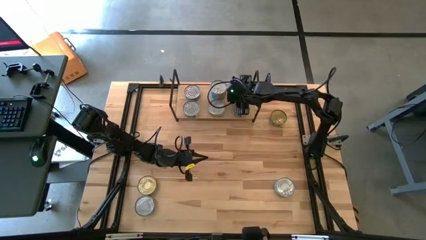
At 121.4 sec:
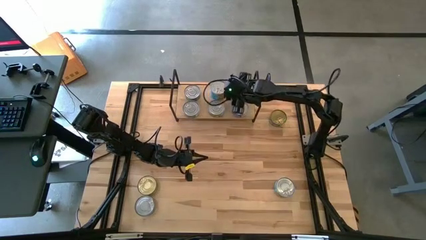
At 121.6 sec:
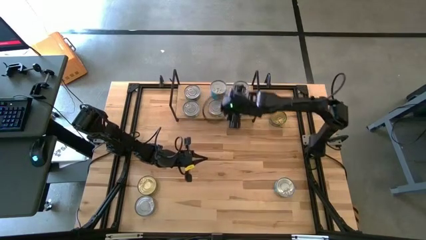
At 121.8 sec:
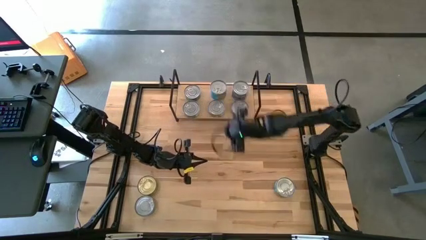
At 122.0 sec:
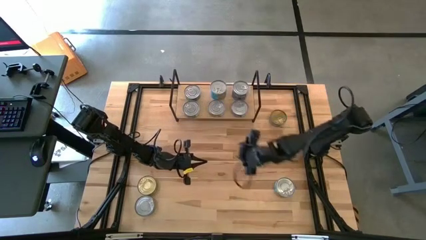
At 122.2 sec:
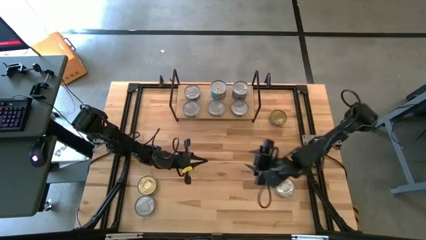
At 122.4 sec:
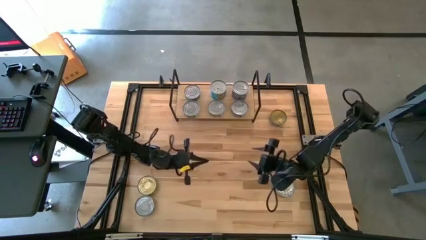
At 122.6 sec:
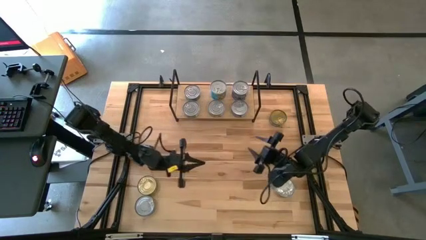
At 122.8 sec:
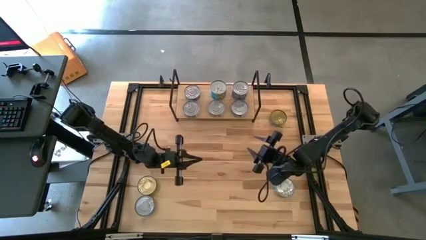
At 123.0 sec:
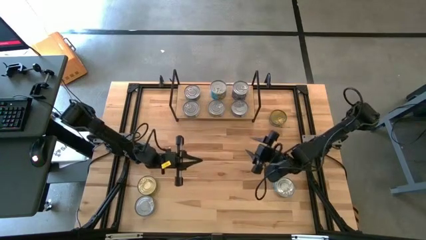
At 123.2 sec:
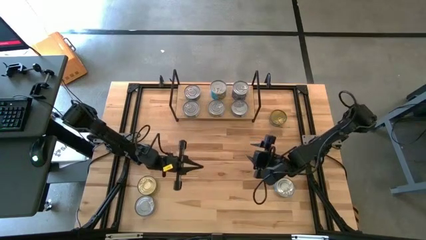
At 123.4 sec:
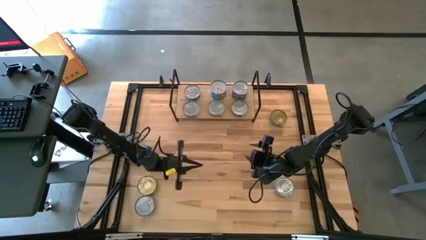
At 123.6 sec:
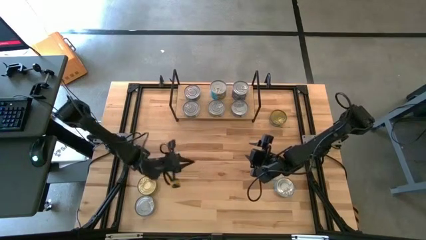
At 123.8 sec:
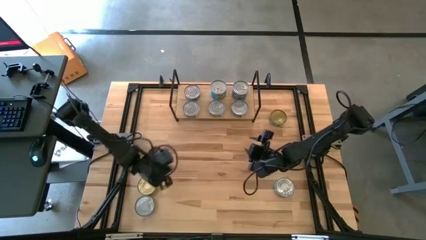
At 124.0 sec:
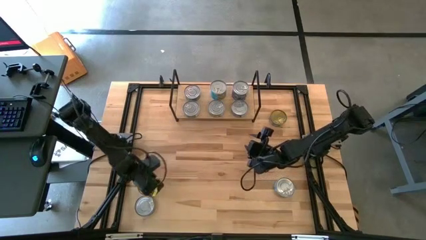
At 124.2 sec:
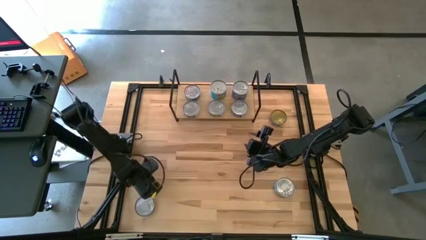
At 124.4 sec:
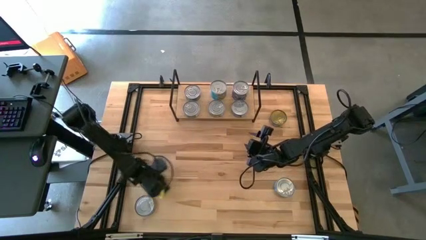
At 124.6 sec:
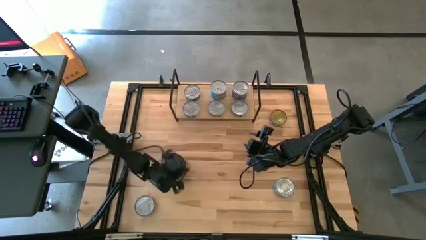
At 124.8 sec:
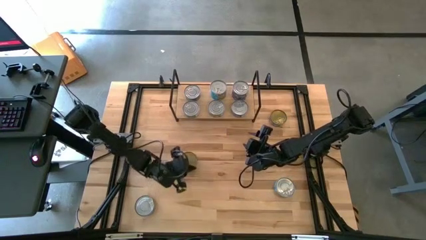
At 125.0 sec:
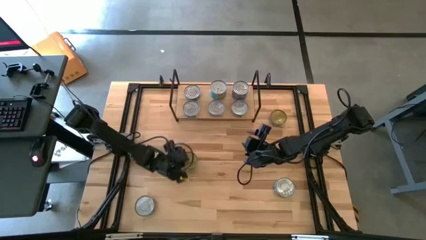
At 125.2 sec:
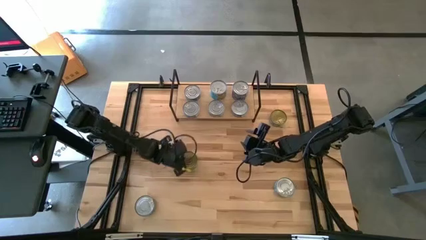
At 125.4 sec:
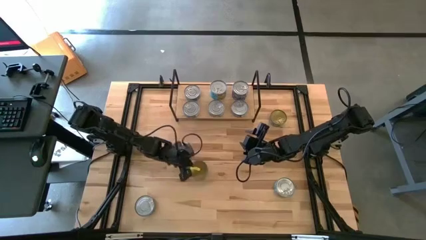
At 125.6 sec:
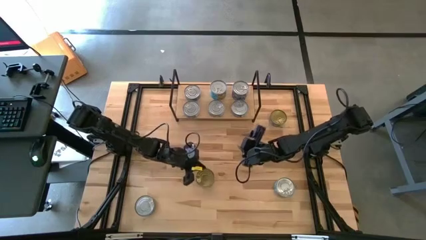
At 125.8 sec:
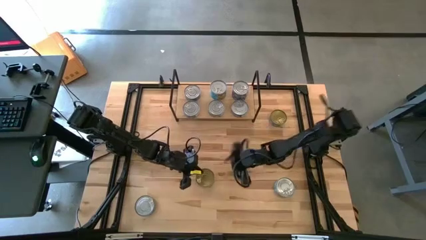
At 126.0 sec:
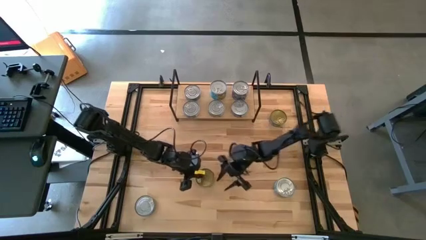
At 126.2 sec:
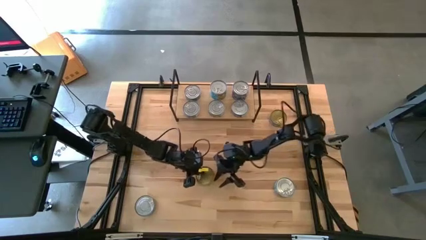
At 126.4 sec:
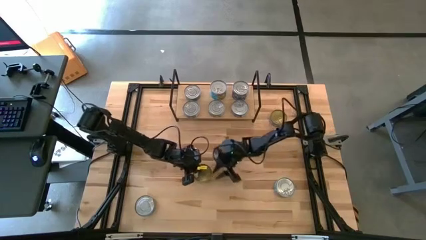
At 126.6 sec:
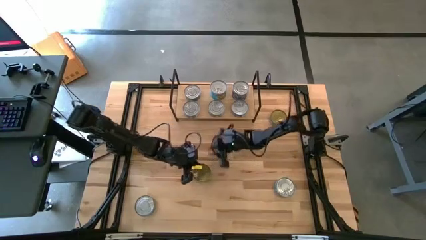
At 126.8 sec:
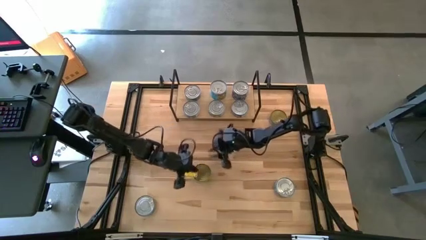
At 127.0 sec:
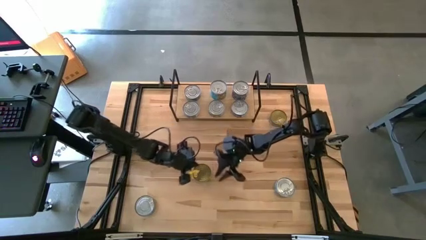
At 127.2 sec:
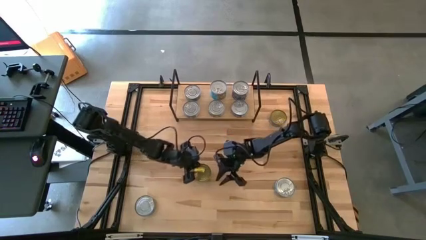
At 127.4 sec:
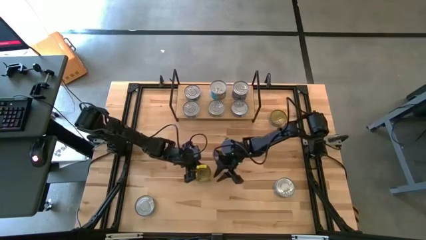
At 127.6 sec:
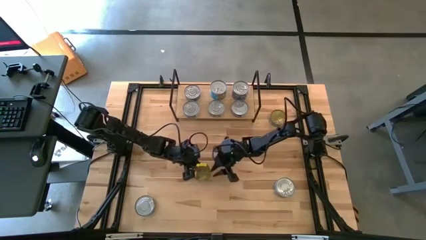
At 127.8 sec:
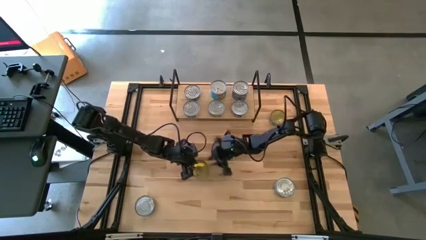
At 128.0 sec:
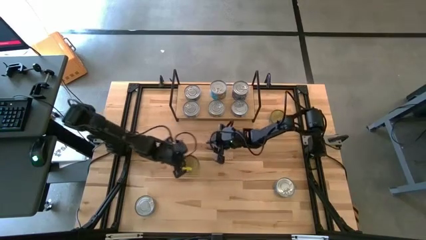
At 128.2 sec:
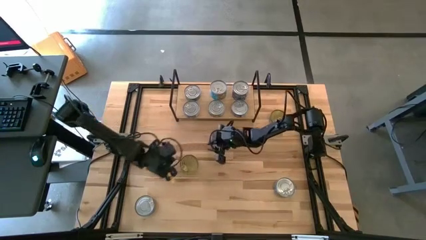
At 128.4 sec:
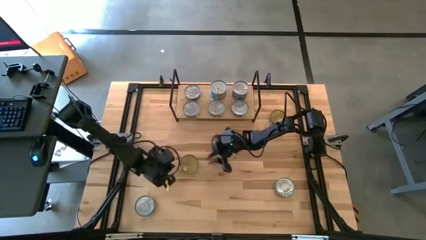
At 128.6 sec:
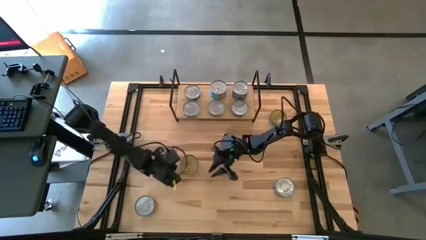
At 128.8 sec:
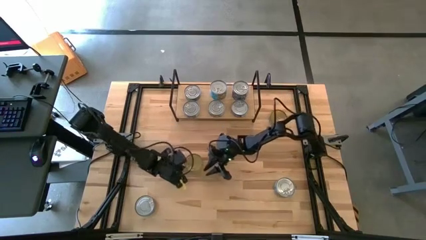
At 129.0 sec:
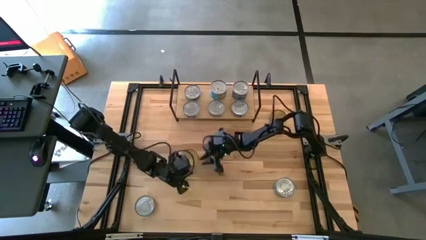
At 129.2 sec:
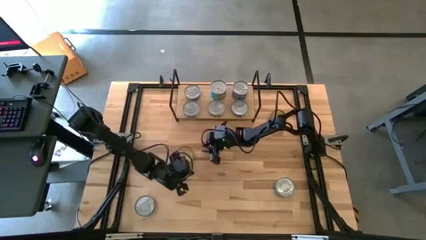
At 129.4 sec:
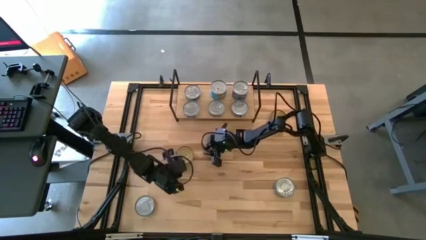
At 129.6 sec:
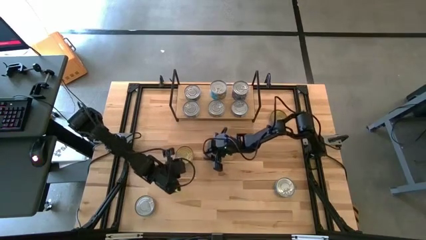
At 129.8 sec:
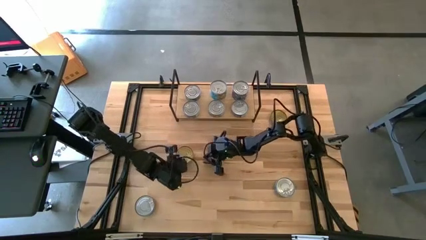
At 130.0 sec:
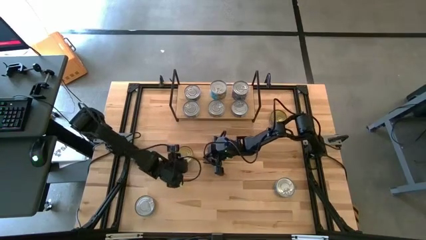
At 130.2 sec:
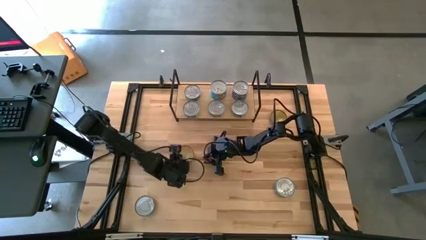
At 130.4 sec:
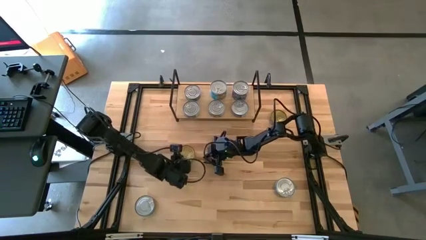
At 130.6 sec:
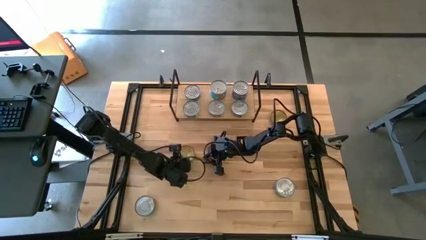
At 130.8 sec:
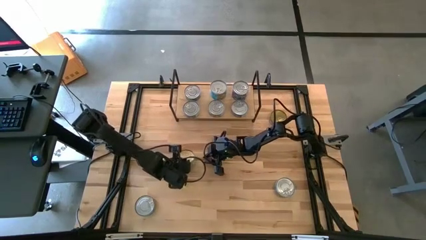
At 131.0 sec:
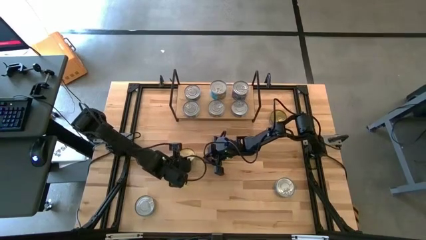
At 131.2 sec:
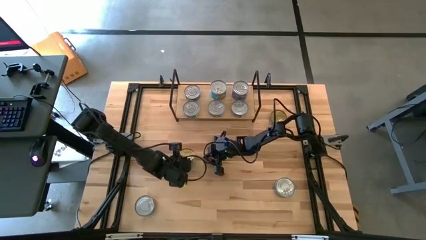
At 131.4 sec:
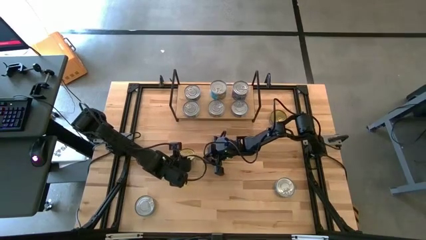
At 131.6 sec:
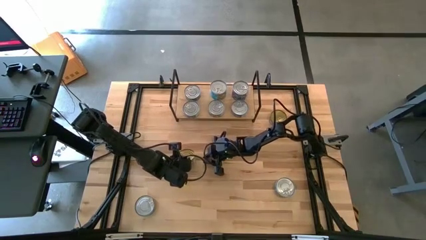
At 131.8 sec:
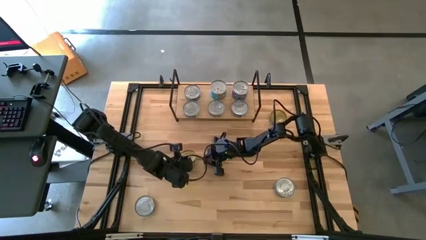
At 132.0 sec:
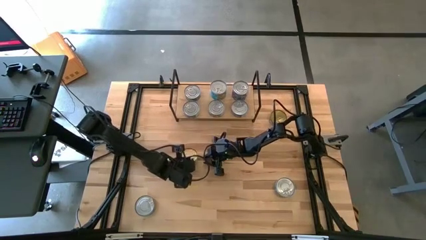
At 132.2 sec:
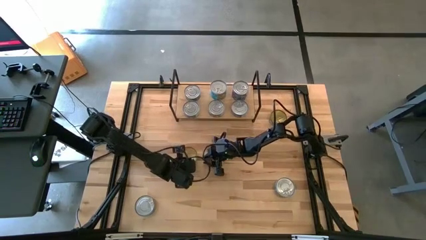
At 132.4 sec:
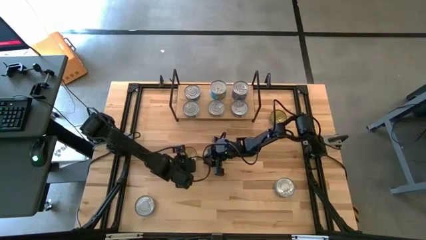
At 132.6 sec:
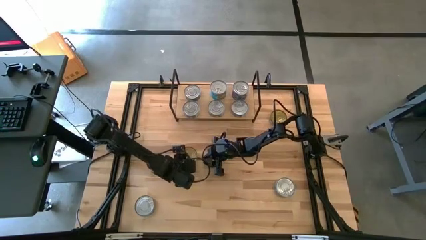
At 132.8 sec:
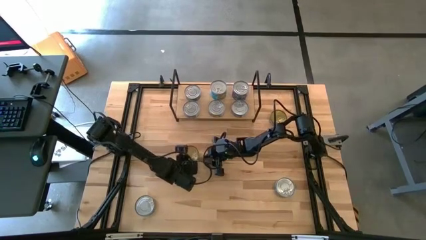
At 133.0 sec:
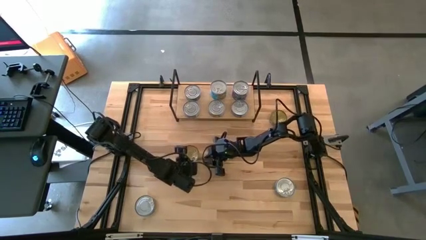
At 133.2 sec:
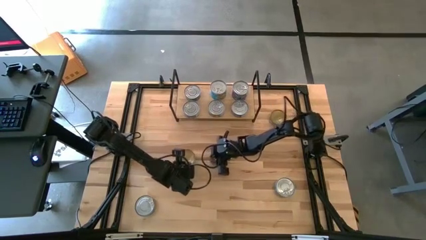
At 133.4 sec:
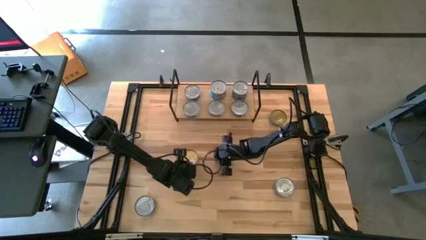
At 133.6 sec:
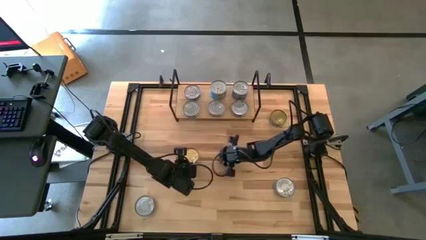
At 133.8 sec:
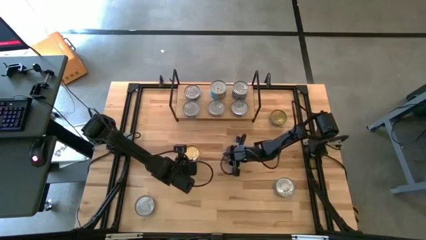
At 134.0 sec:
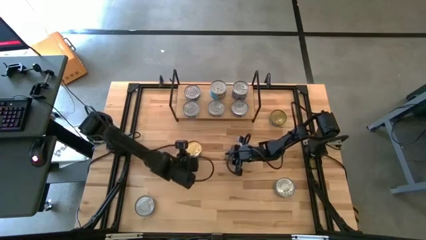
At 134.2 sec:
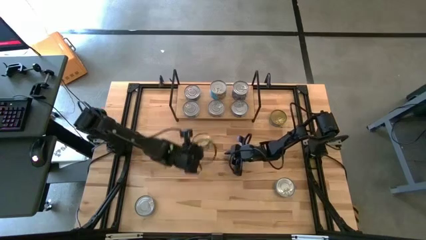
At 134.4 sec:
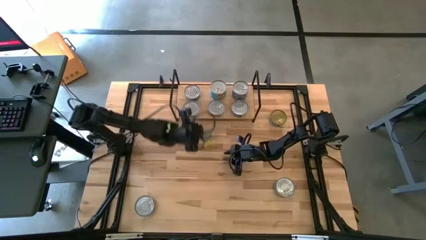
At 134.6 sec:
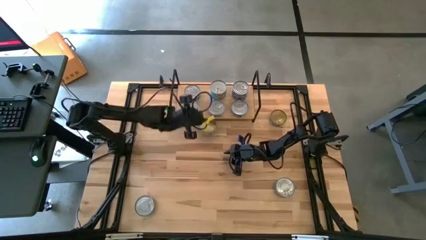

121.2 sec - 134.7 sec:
Task: Stack canned seafood by type on shelf
Stack the green tuna can on top of the green tuna can on the shelf

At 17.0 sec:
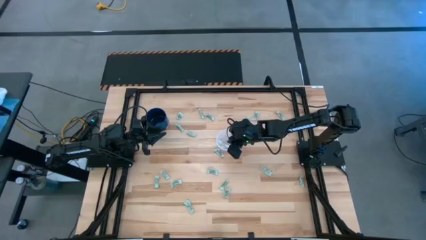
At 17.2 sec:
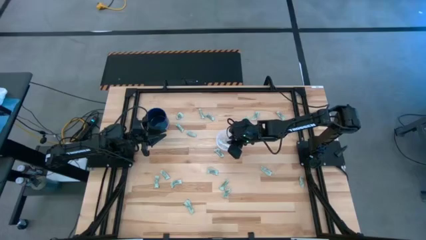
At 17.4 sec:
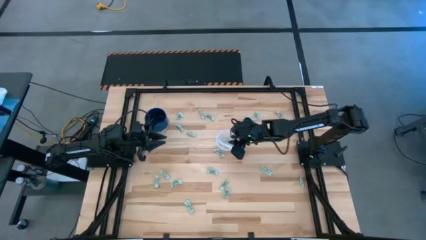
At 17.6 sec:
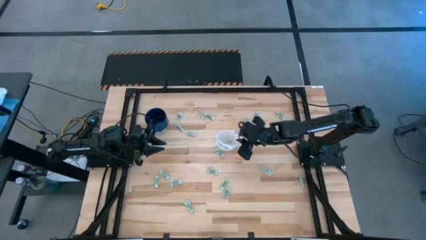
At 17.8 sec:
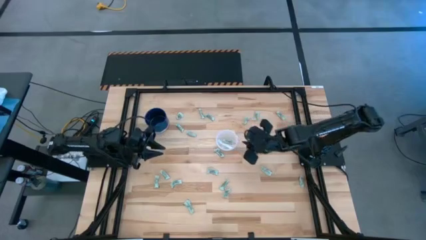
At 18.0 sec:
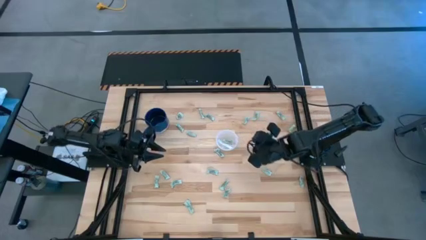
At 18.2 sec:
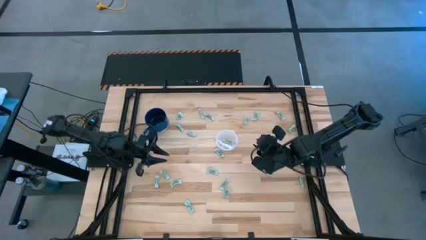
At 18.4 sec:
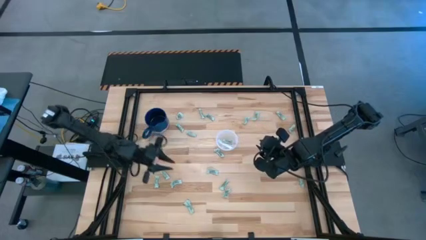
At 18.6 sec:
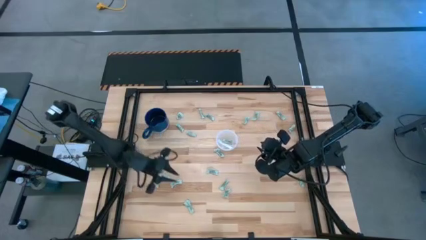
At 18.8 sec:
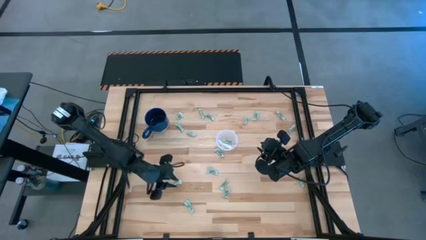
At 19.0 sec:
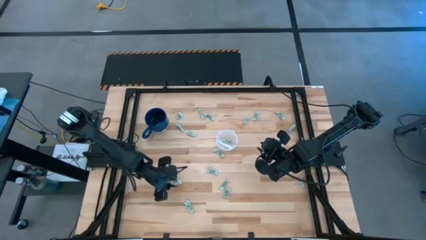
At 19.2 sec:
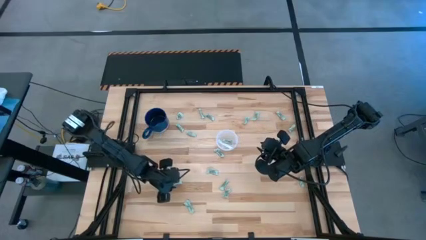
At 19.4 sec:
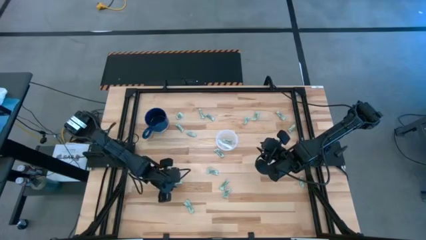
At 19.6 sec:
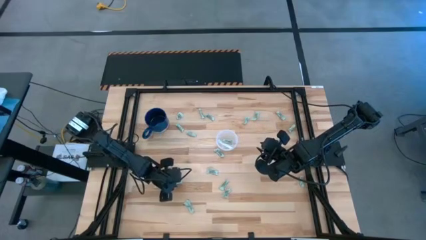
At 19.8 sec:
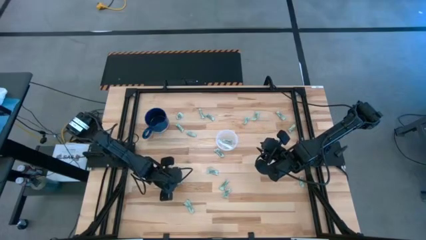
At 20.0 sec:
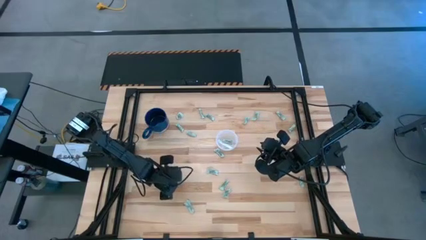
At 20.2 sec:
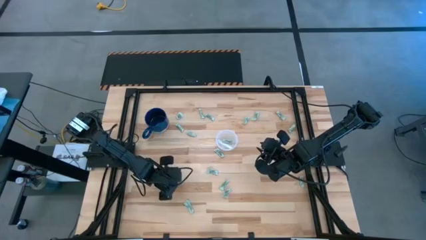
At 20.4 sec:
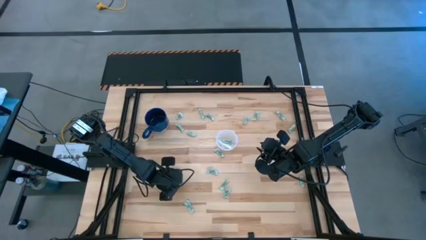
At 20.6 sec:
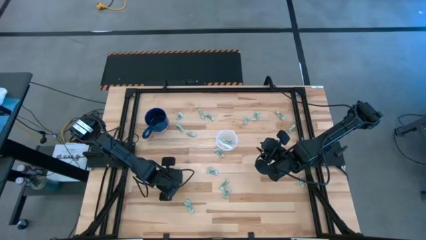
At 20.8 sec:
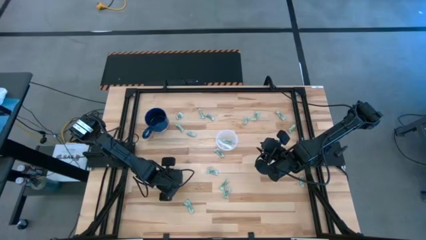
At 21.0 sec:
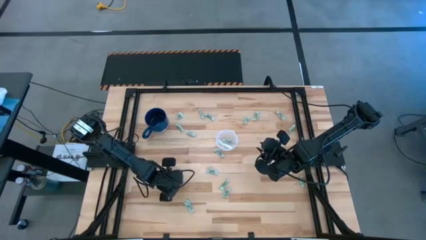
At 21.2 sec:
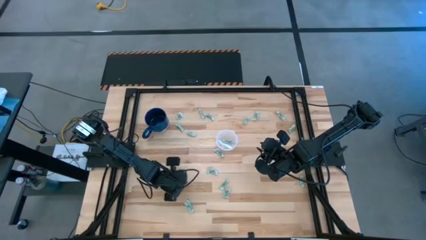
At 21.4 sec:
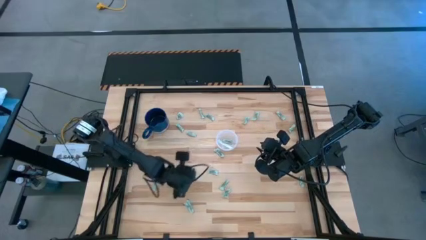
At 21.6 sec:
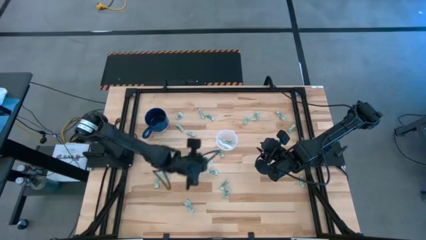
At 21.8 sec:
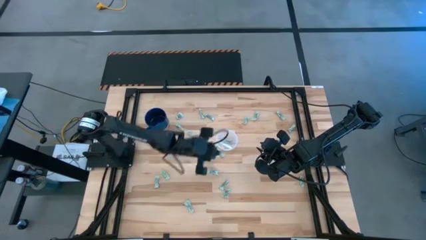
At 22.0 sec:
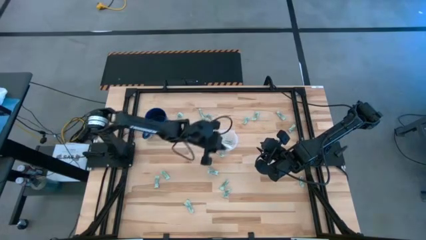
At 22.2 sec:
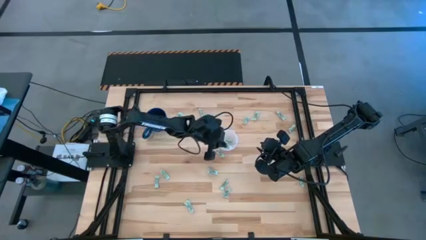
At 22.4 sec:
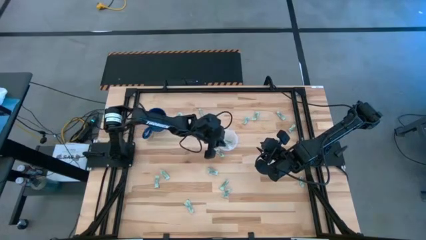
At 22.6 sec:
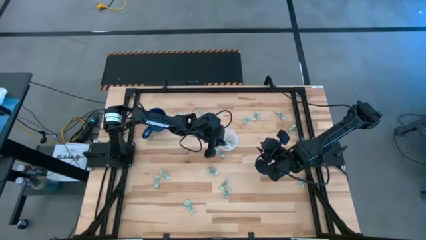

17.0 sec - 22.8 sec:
Task: Pick and place items into bin
Put the gray stevia packet into the transparent bin
